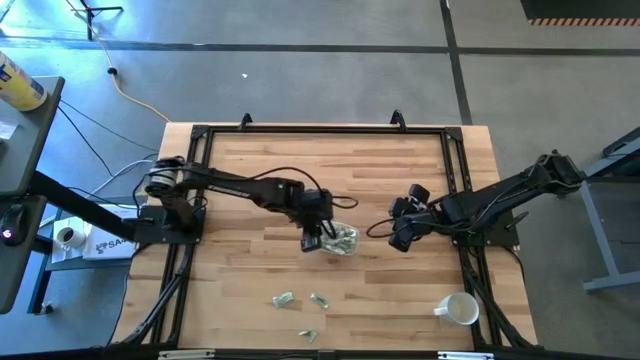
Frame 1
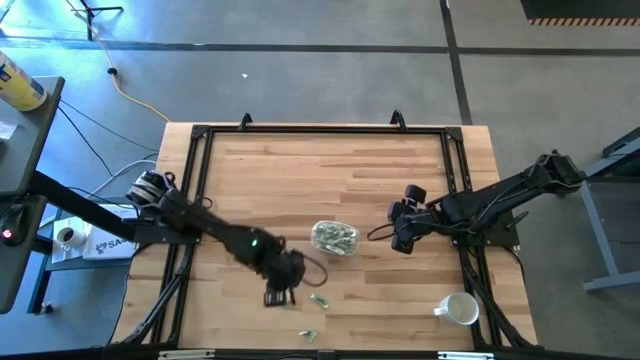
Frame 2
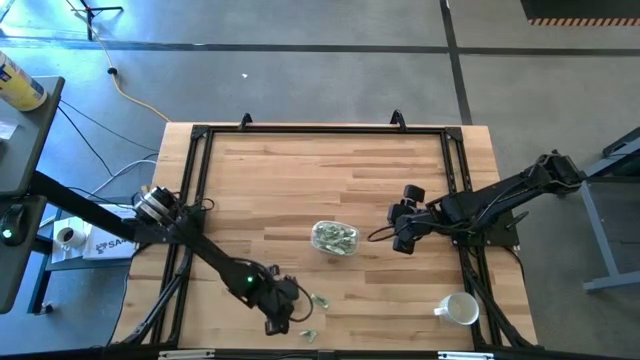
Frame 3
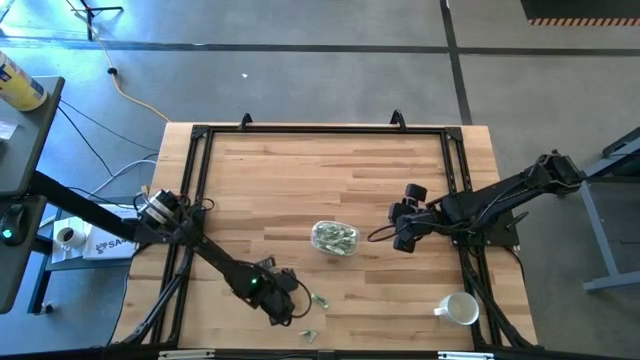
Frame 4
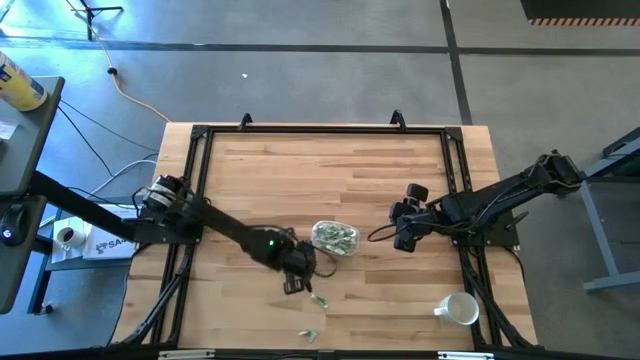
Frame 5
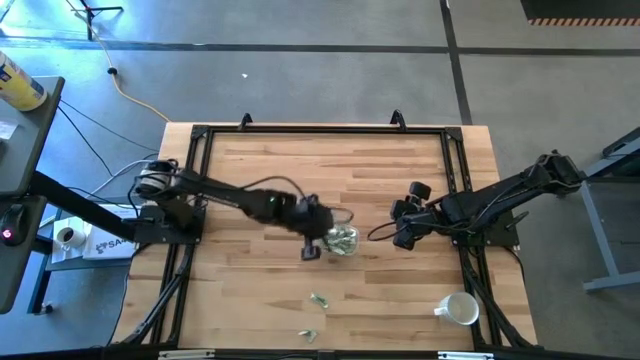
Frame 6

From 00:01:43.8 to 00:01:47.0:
Task: Pick and place Stevia / Truvia into bins
Put the top left green stevia packet into the transparent container

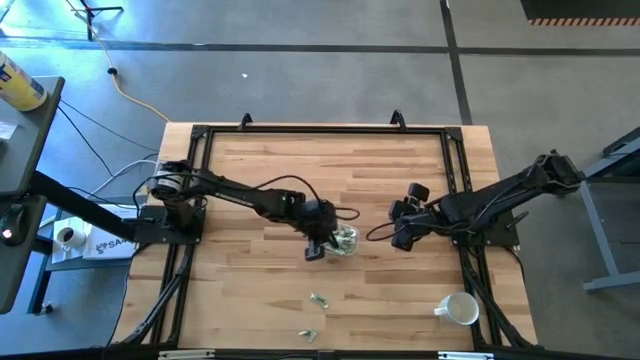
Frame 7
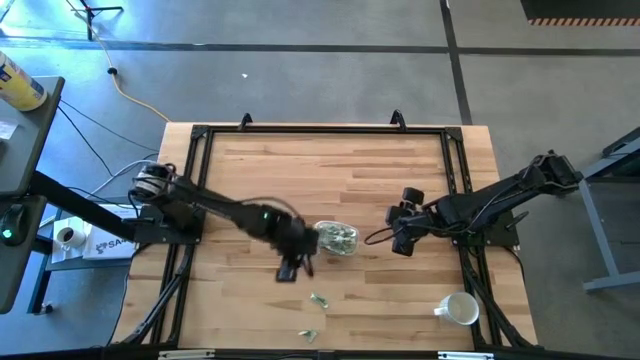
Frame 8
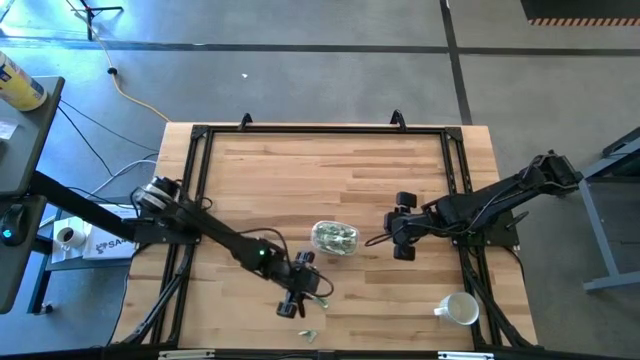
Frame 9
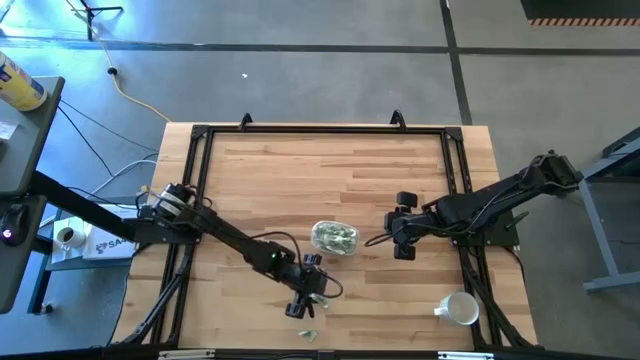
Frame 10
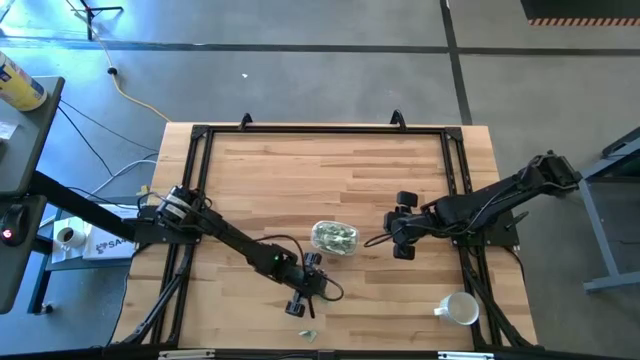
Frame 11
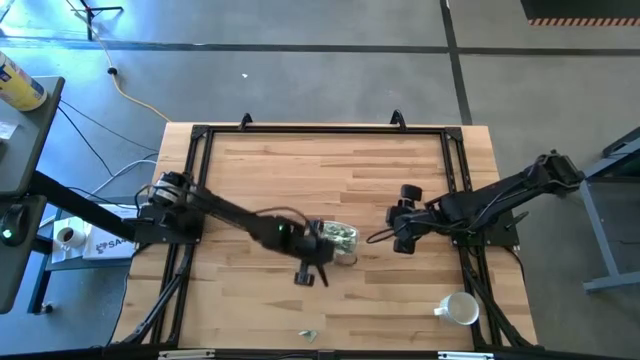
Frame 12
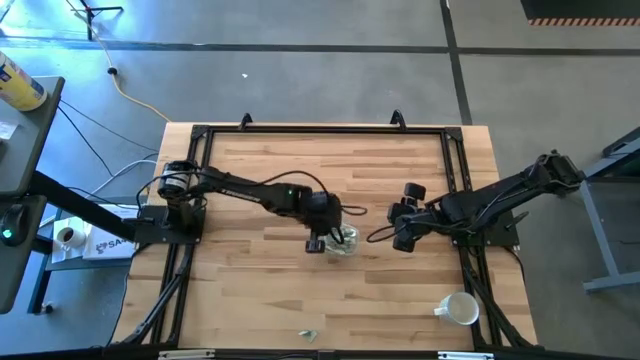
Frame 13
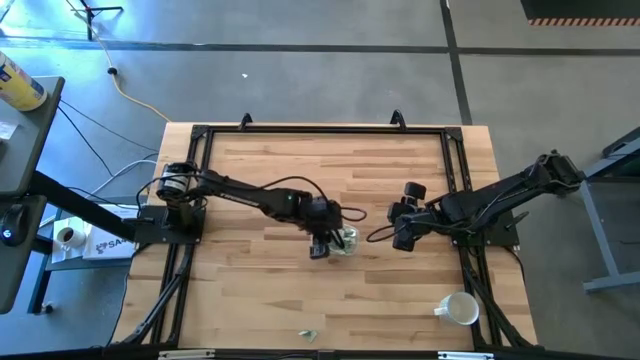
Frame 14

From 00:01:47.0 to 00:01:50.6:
Put the top green stevia packet into the transparent container

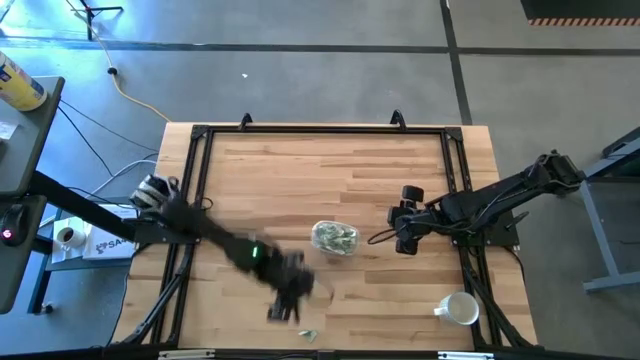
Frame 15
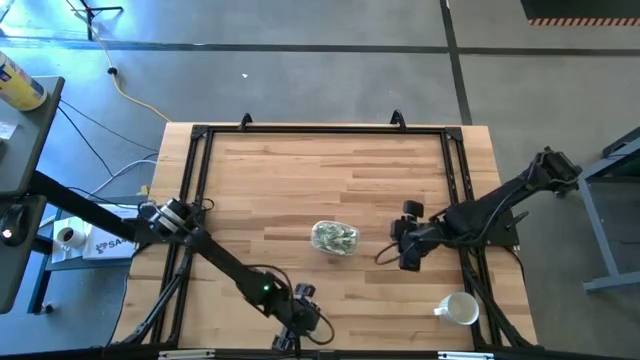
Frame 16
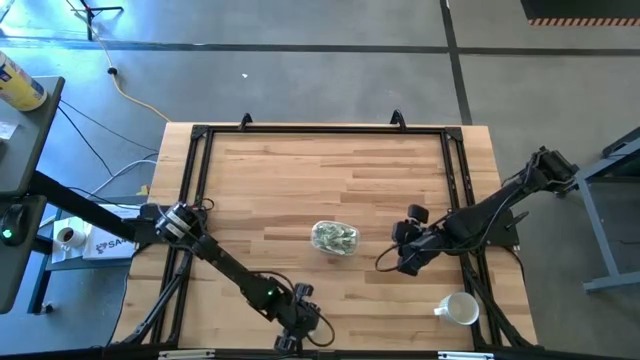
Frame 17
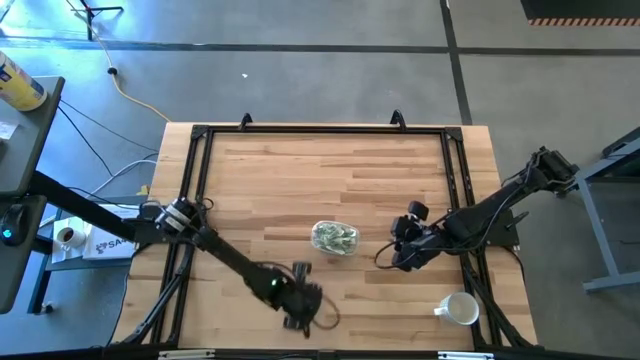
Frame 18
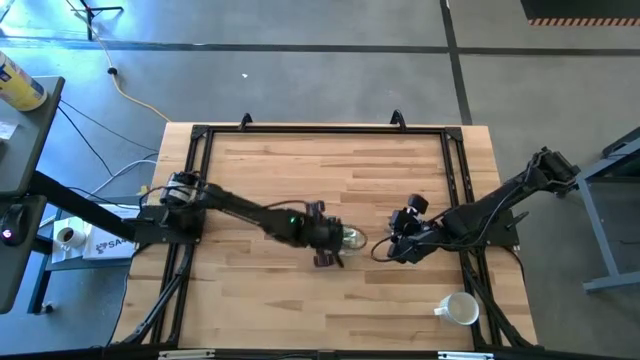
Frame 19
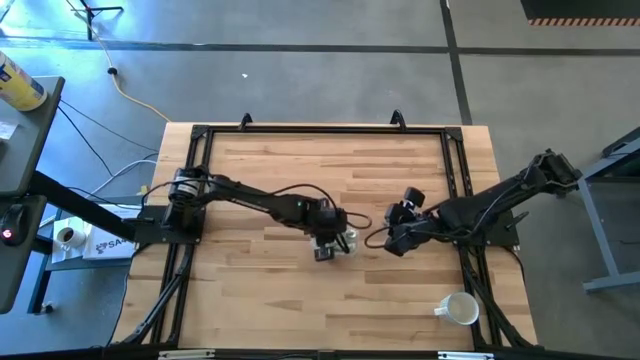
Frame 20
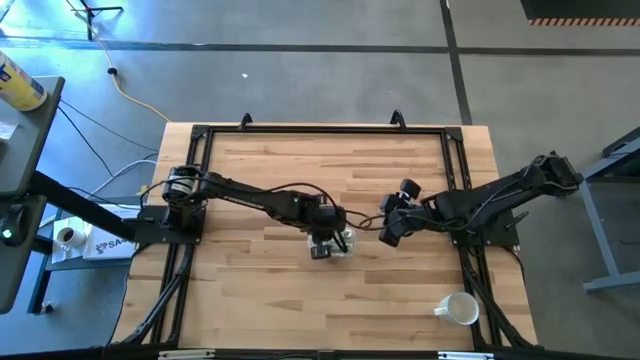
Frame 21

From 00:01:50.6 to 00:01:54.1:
Put the green stevia packet into the transparent container

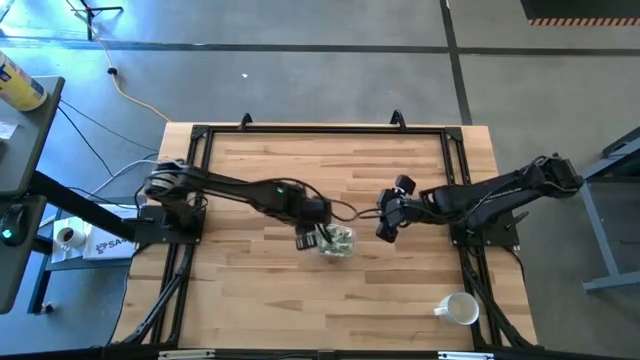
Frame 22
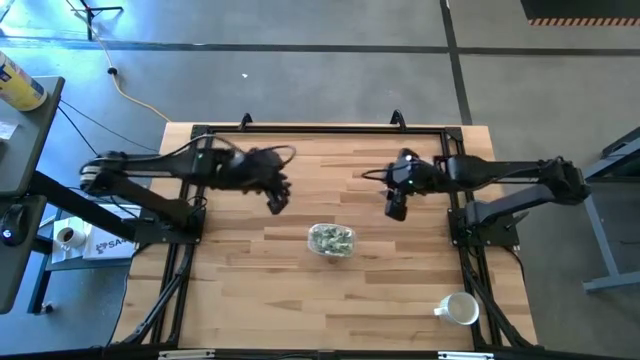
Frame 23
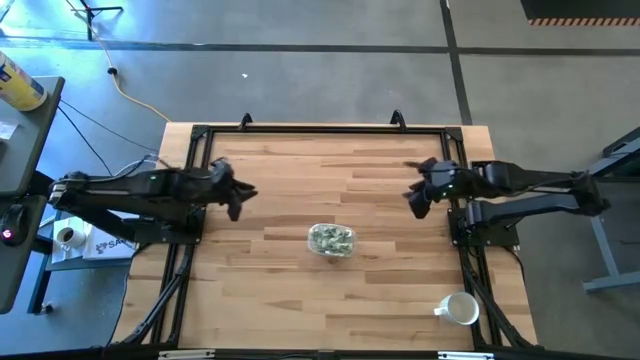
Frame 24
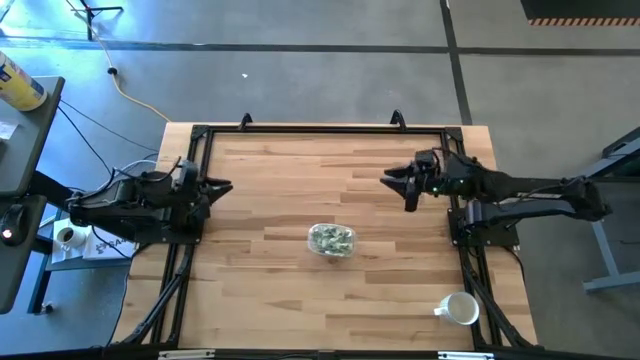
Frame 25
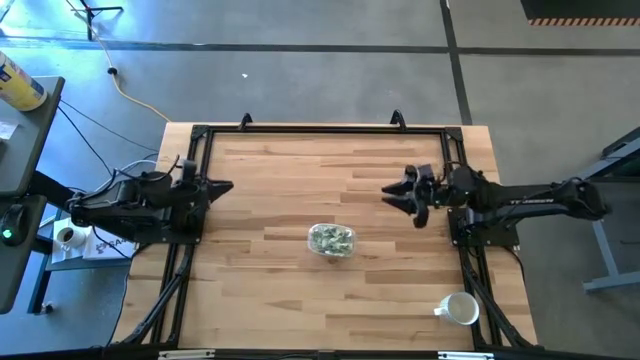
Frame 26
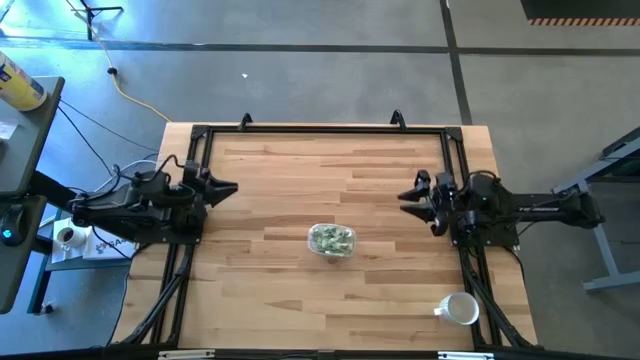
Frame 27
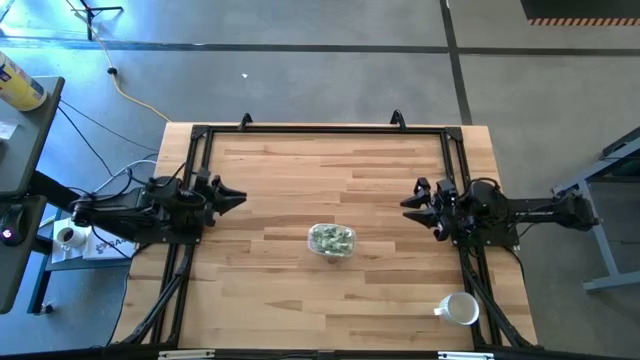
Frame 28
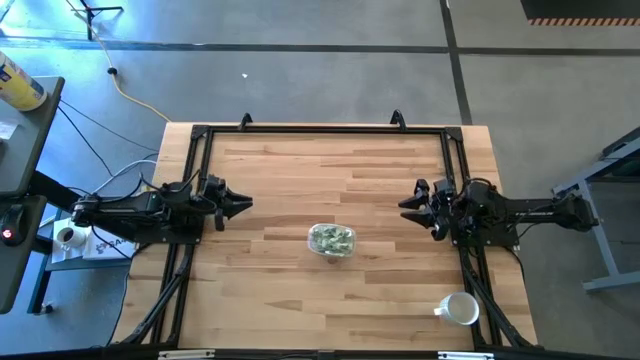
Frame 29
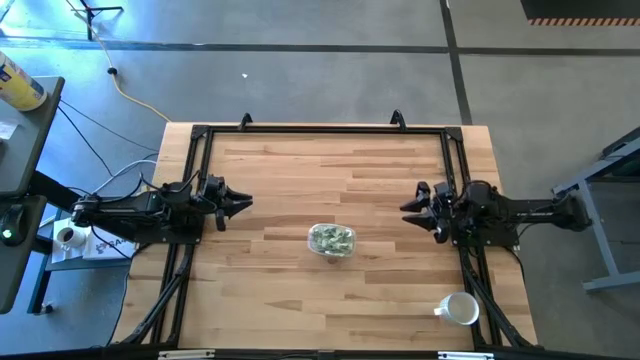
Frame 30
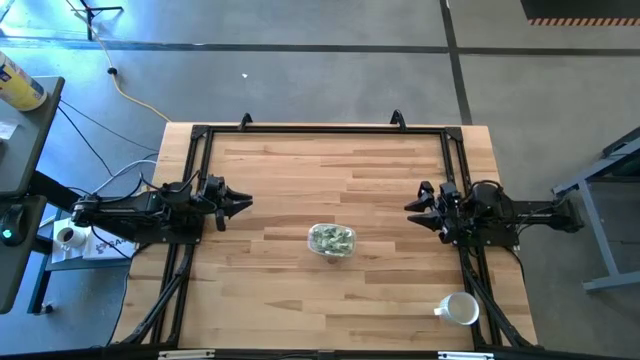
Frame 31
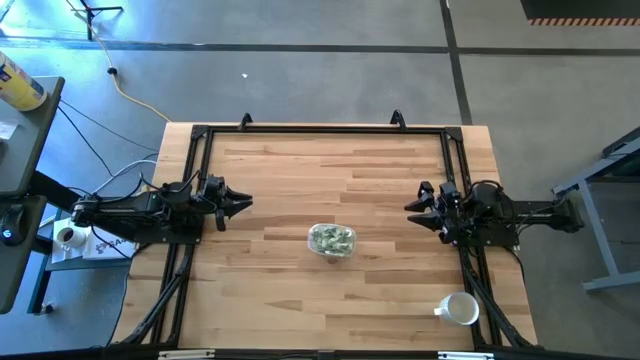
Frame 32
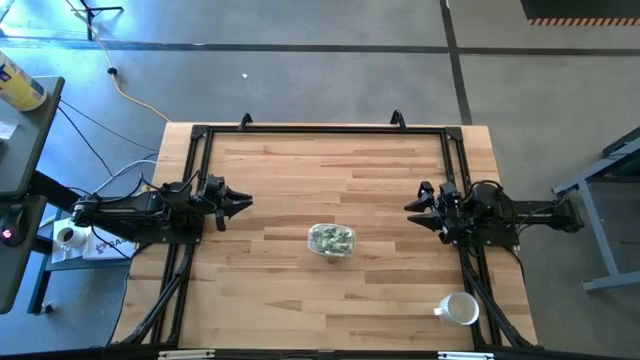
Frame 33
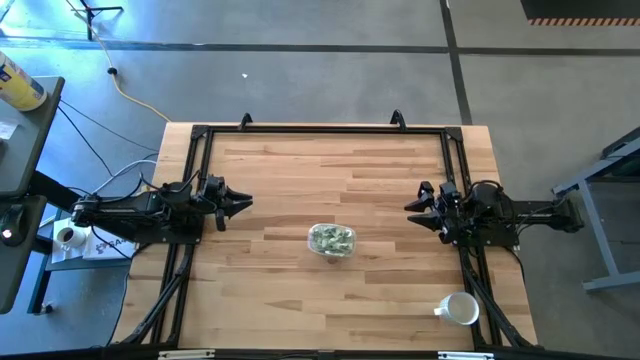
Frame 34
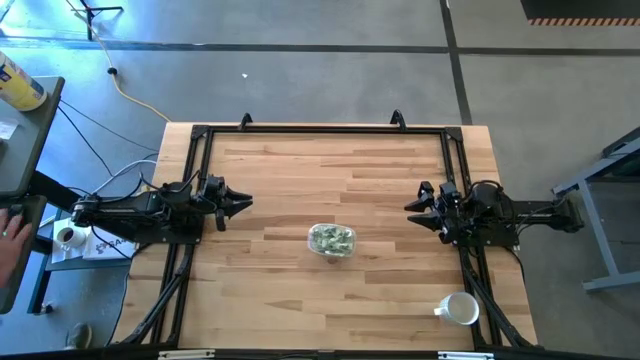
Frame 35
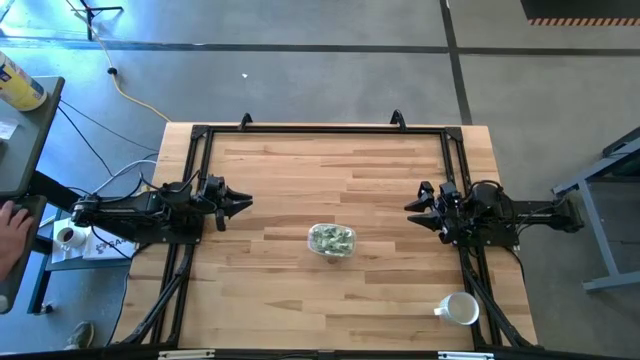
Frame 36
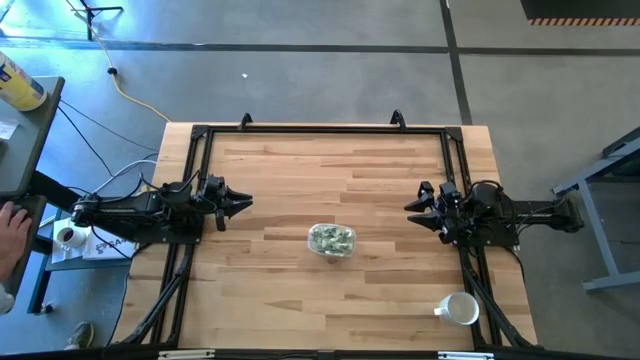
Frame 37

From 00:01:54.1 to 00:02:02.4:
Return to Home Position

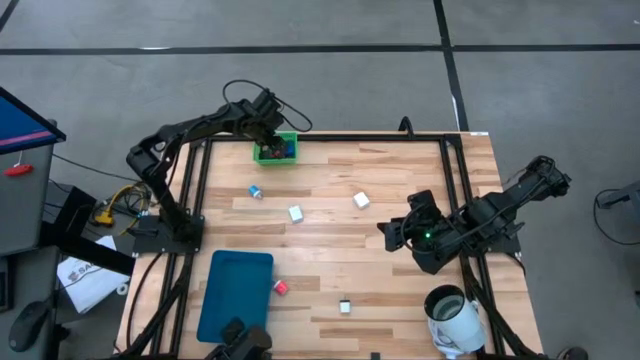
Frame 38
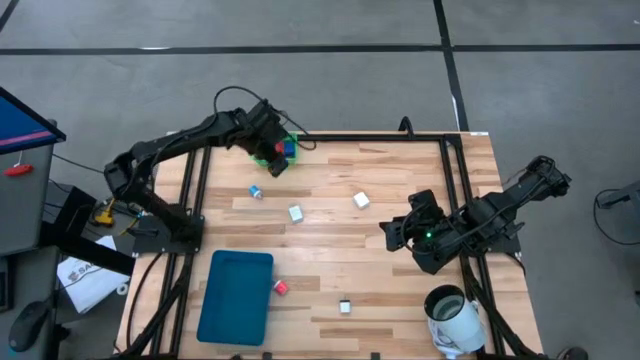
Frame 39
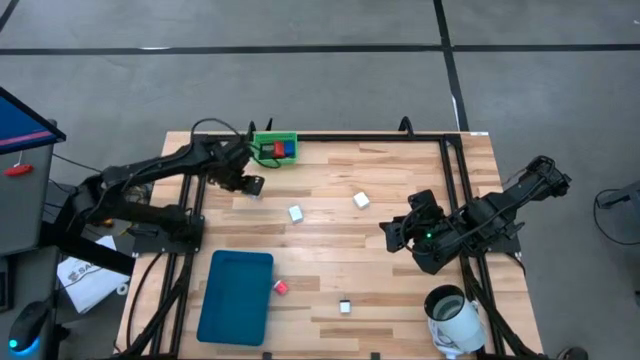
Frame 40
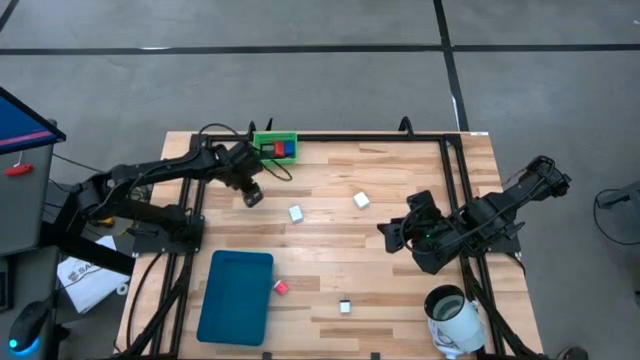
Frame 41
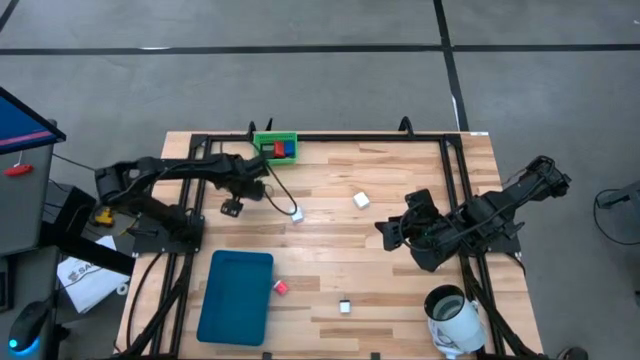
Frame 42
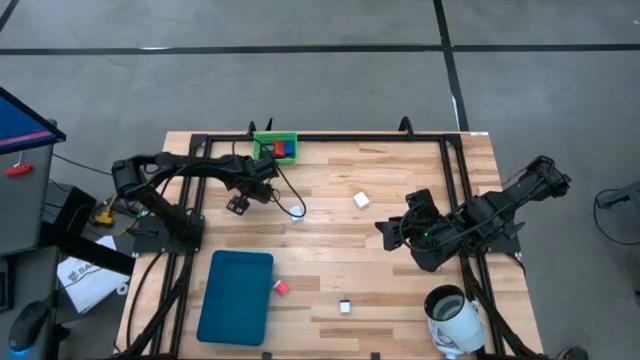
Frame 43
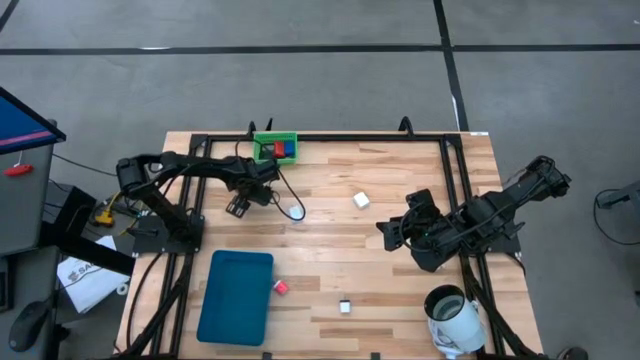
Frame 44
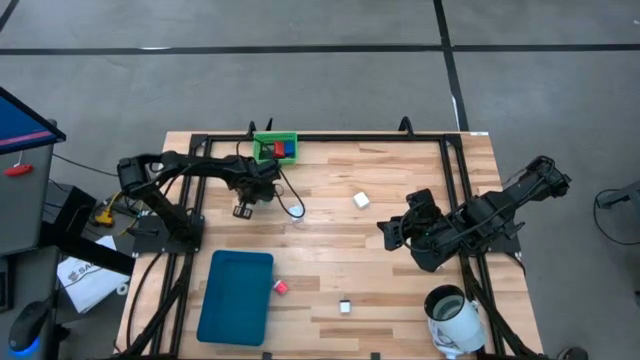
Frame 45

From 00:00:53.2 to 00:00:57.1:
Task: Pick & Place Office items
Put the left light blue charger adapter into the blue bin
